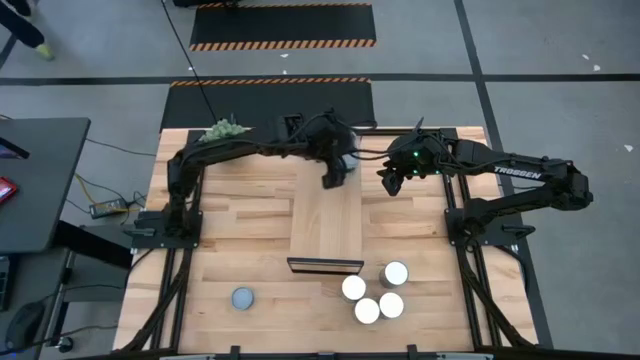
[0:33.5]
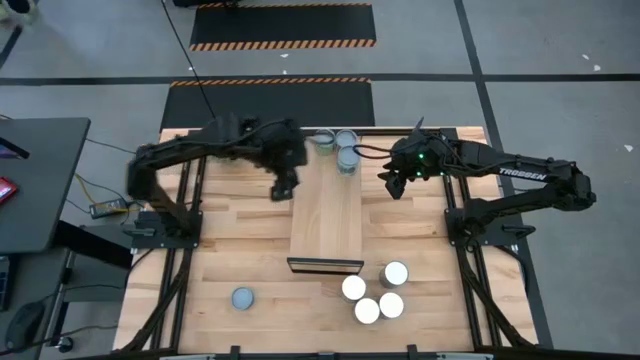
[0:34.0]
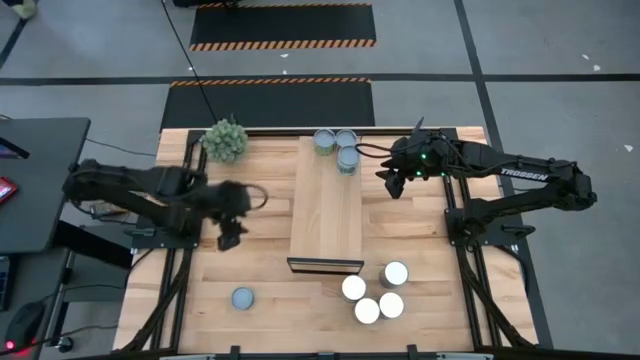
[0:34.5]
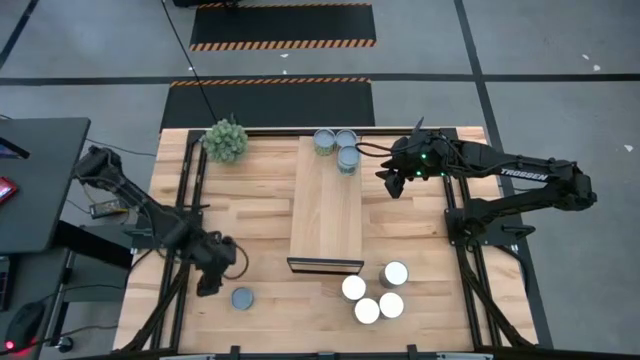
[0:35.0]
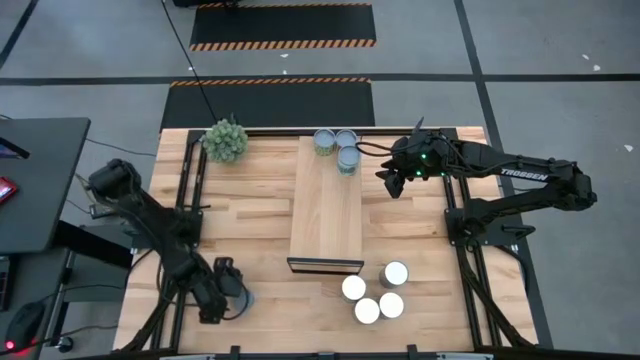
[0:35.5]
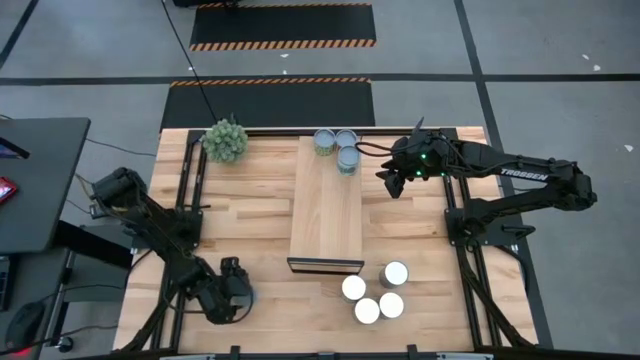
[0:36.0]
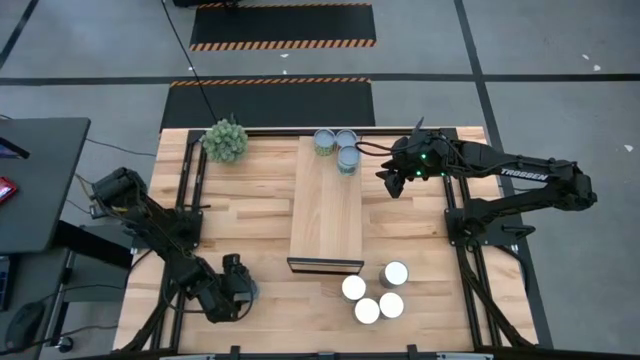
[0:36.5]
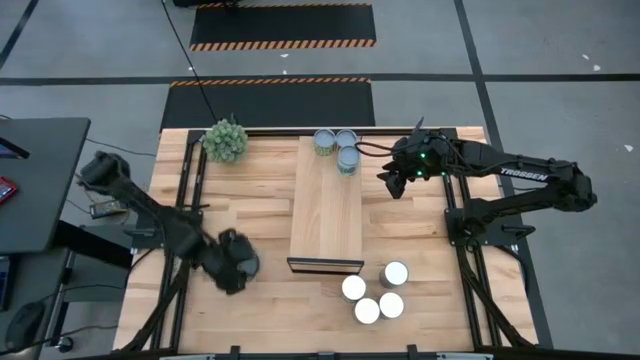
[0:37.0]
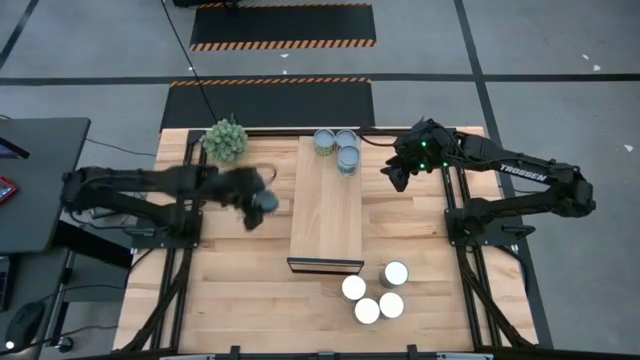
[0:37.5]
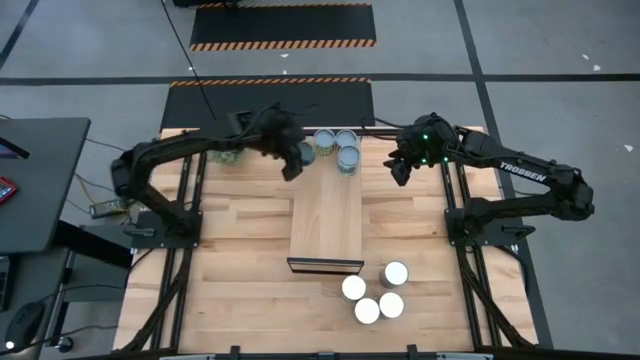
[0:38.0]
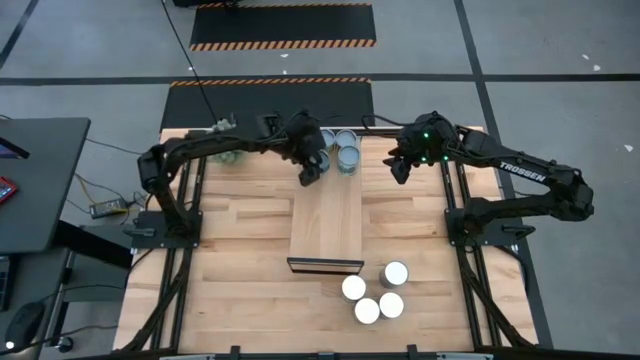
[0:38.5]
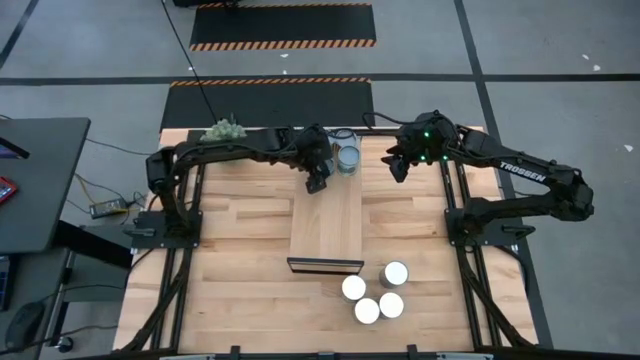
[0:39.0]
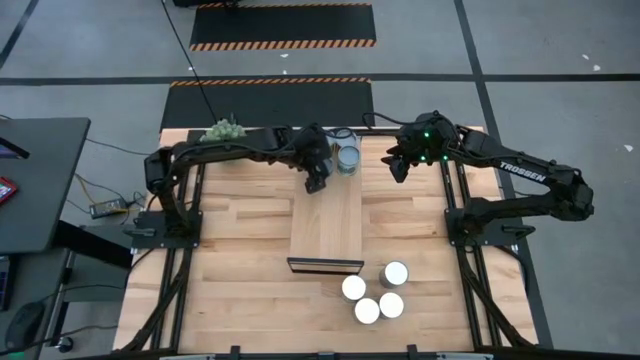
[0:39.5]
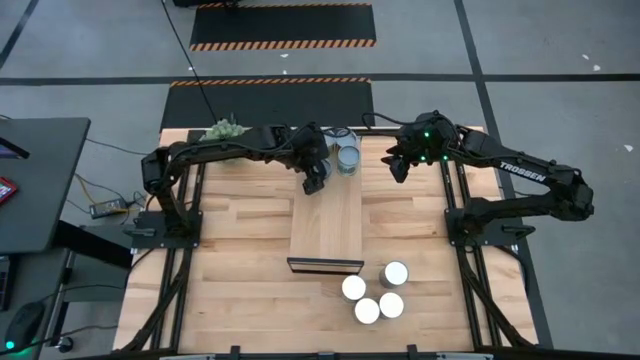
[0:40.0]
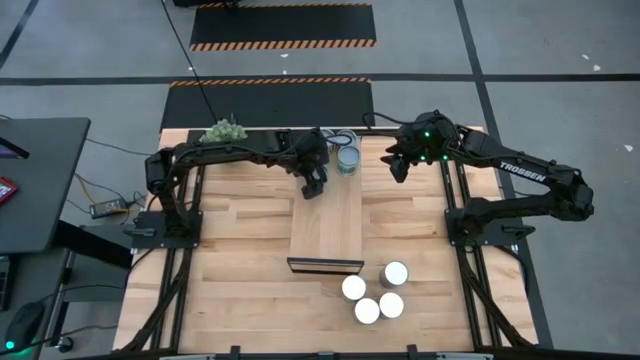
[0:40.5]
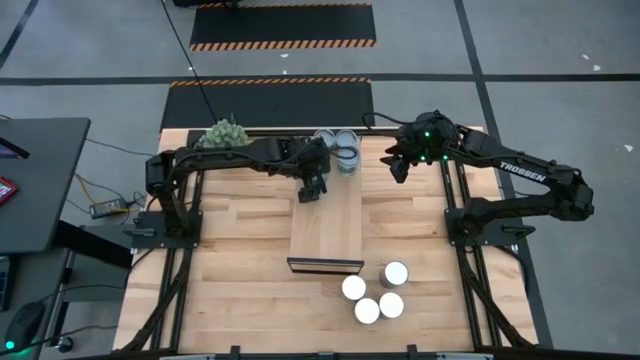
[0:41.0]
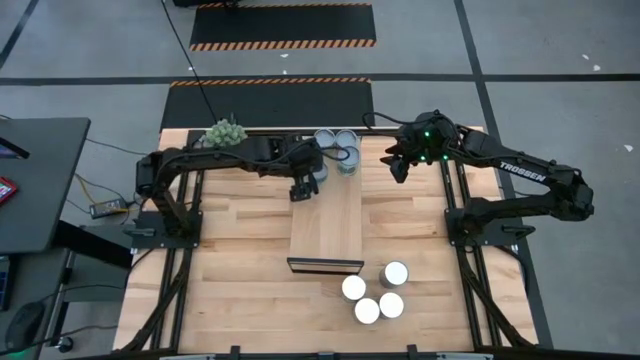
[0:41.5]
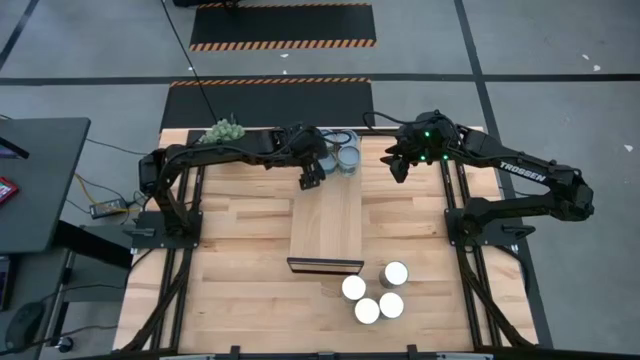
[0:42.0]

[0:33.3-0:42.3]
Task: Pick and place cans onto a shelf
Put the small canned tuna on the shelf

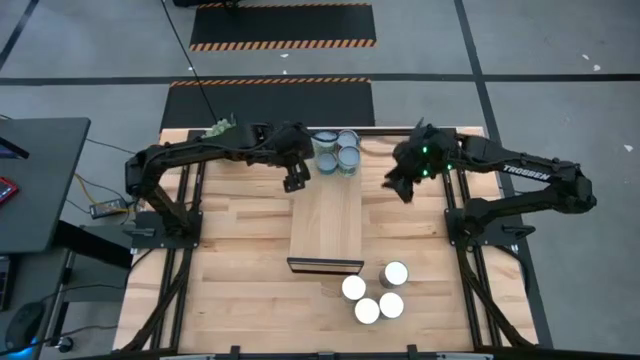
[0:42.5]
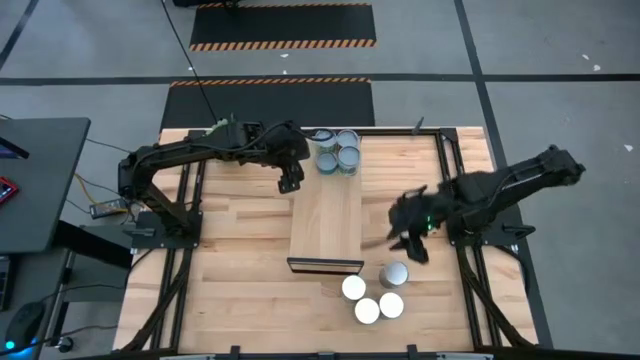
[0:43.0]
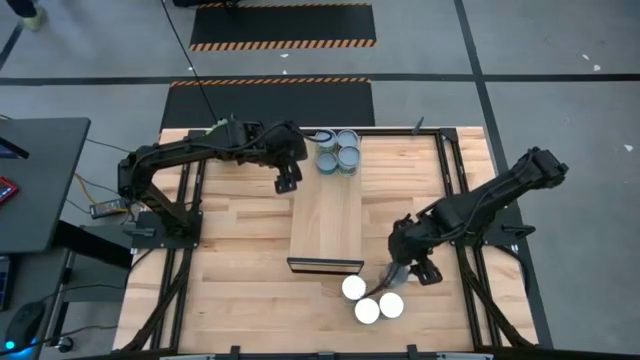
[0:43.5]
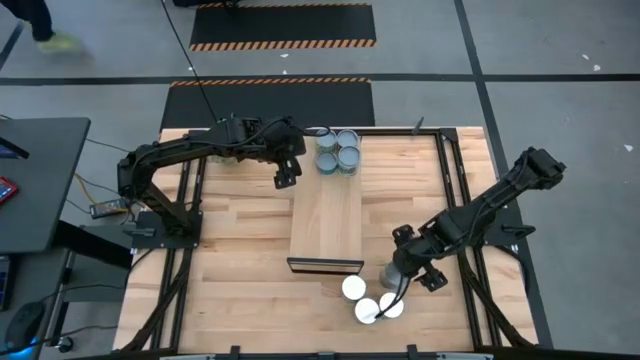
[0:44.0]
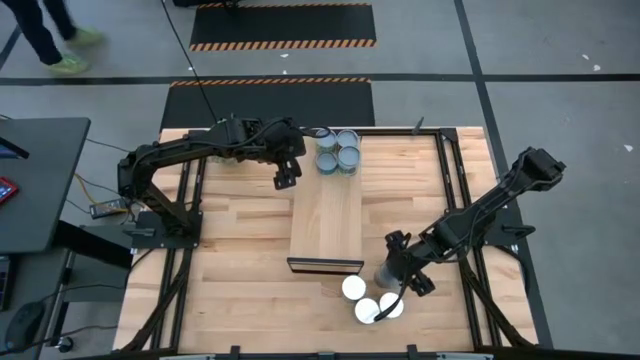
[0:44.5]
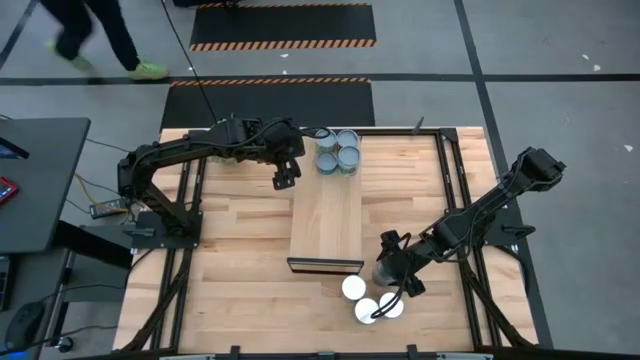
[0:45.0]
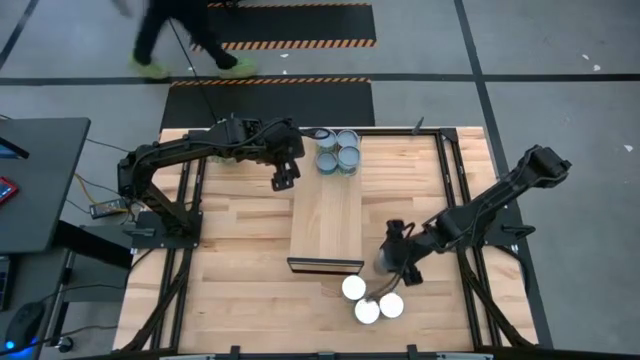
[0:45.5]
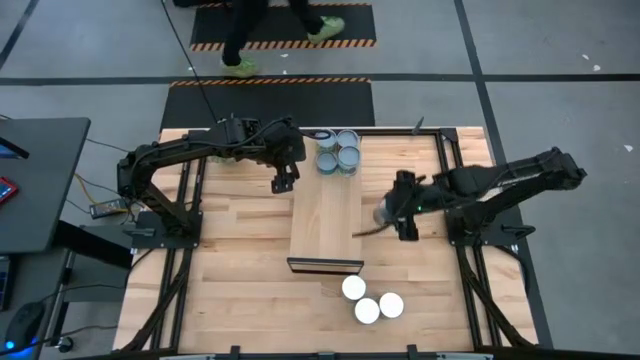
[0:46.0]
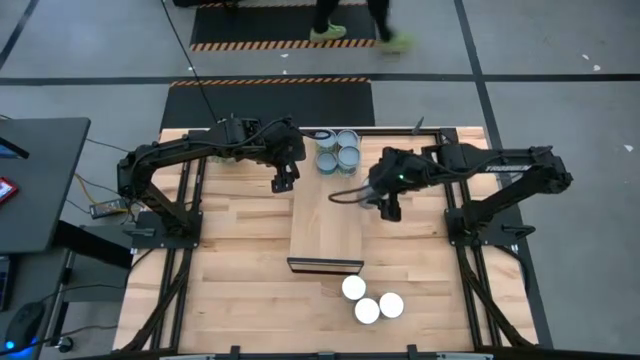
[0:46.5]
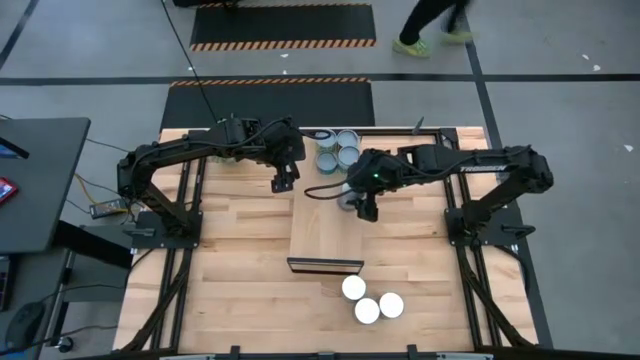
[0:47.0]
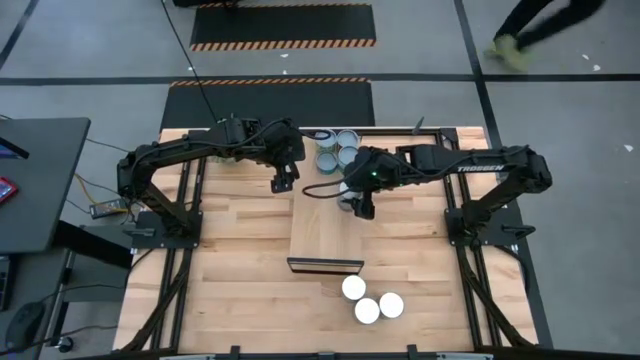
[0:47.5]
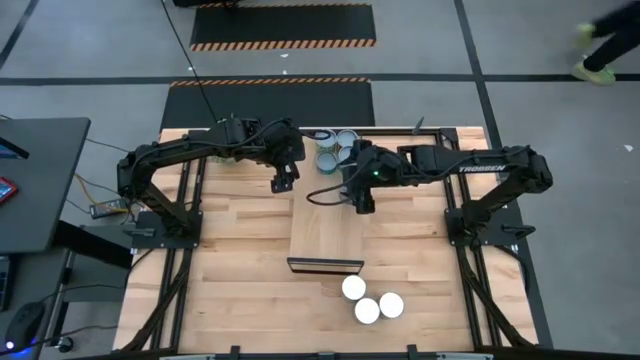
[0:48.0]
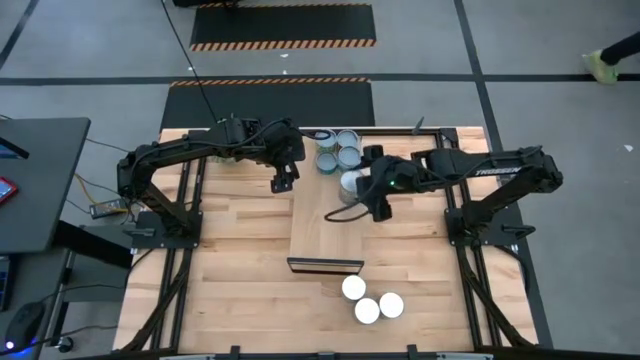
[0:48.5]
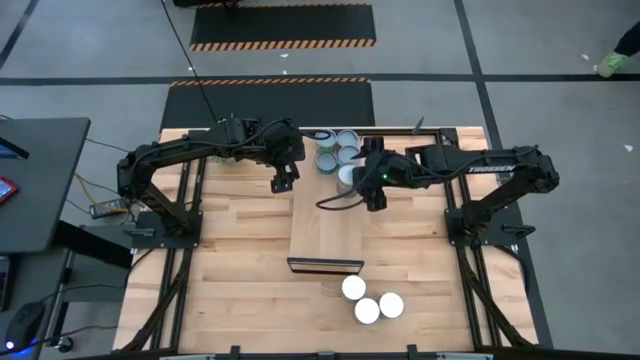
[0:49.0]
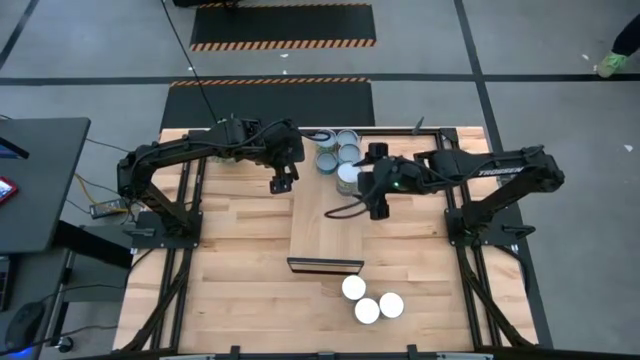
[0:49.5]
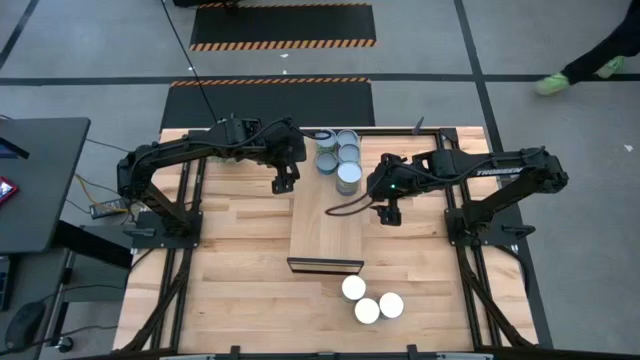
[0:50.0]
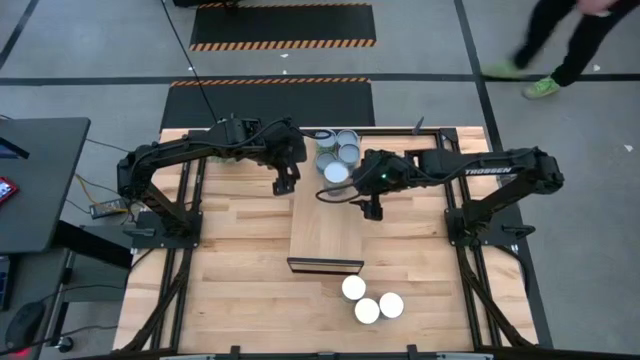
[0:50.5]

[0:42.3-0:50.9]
Put the large canned peas on the shelf

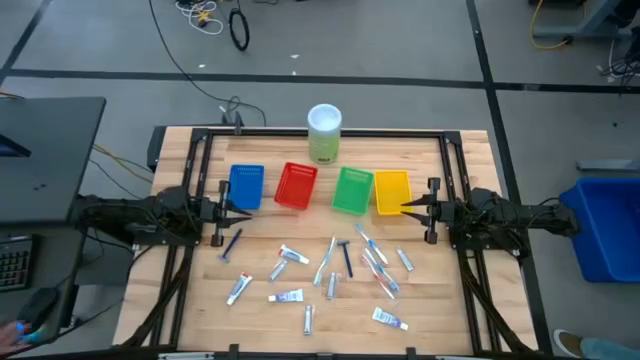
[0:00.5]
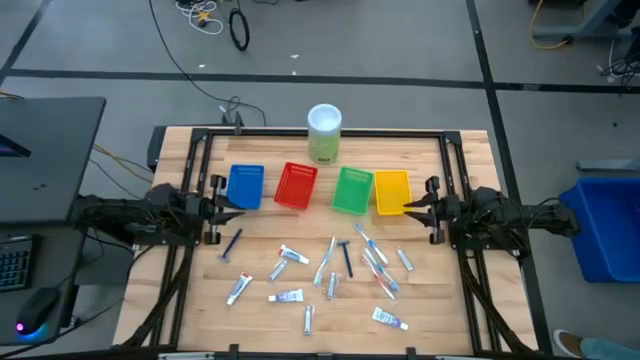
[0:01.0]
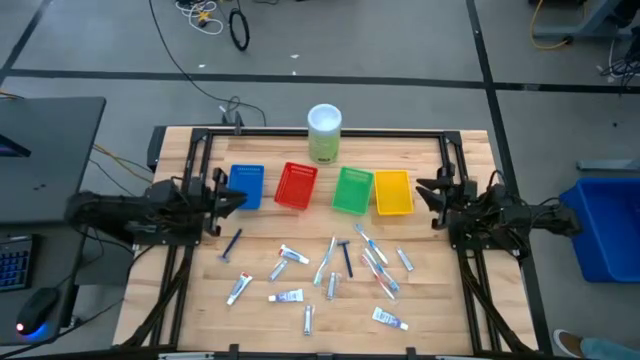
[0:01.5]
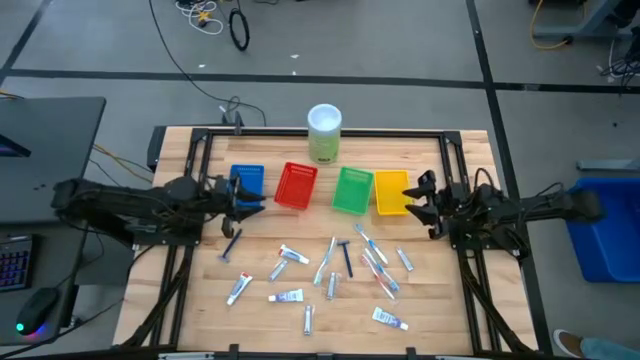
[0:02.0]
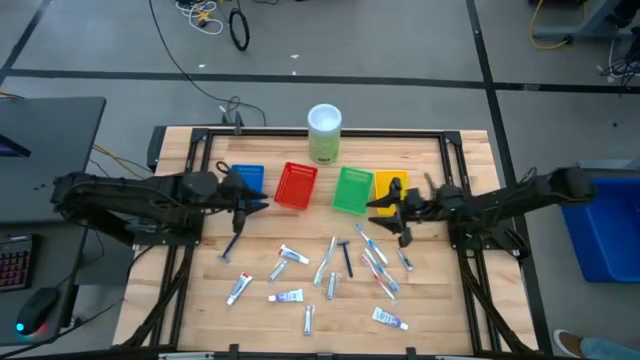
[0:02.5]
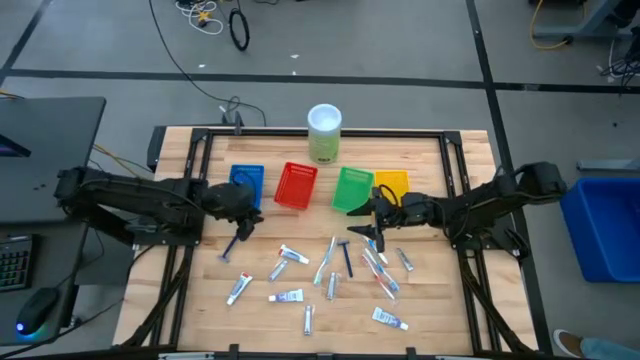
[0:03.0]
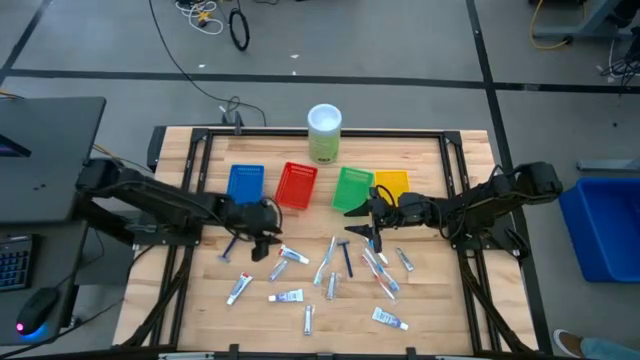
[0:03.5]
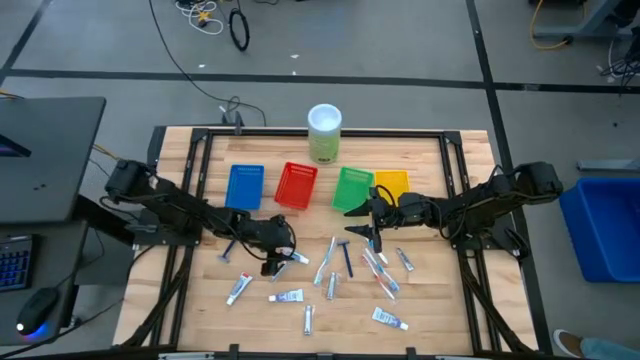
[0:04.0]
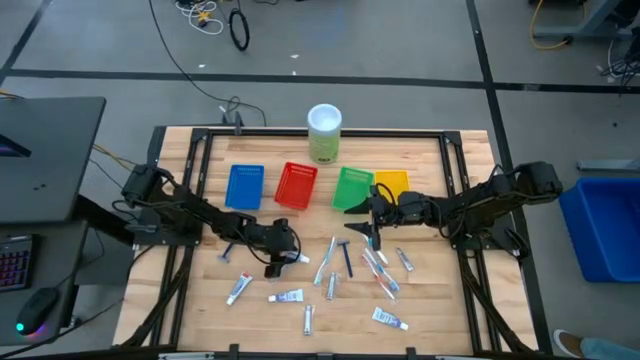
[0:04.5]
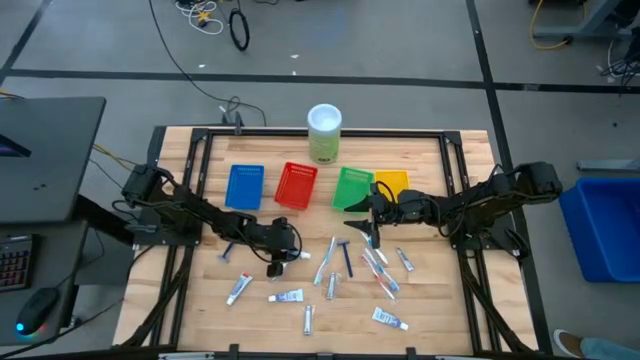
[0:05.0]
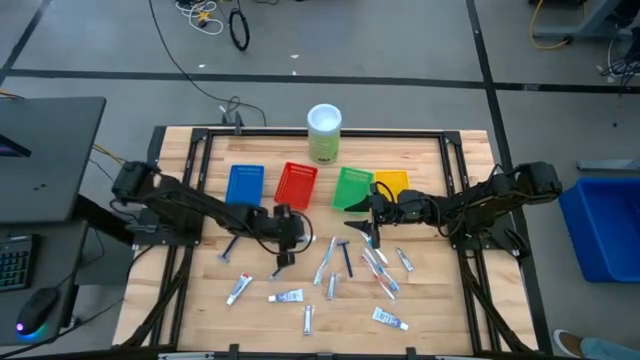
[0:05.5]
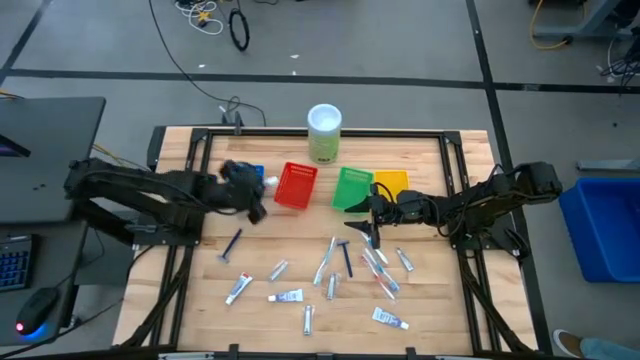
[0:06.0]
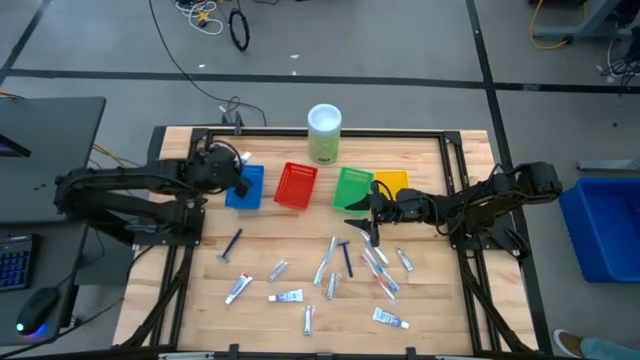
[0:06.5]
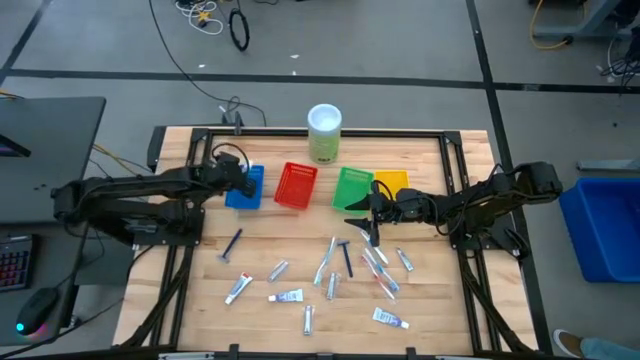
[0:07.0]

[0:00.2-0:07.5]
Task: Pick & Place Travel size toiletries
Put the white toothpaste into the blue basket
